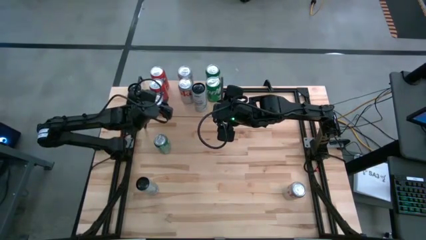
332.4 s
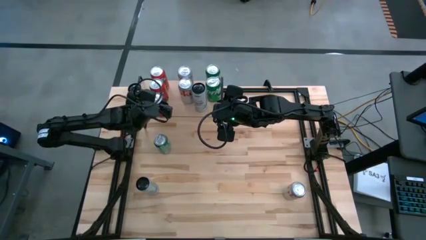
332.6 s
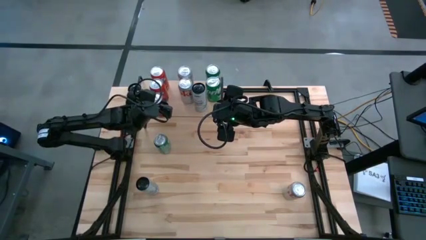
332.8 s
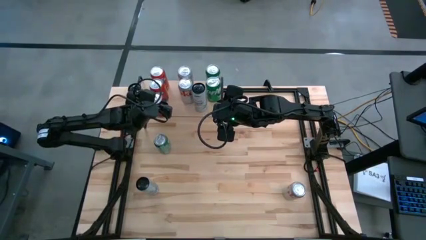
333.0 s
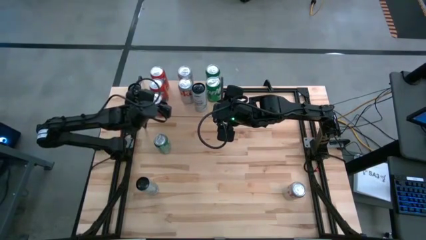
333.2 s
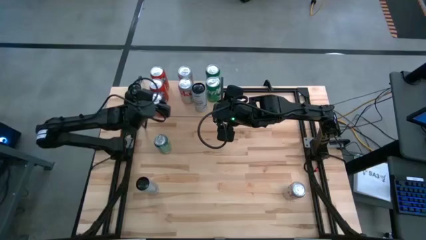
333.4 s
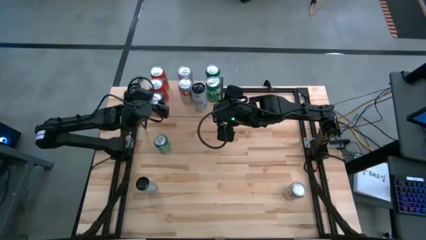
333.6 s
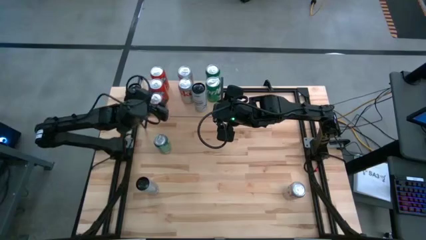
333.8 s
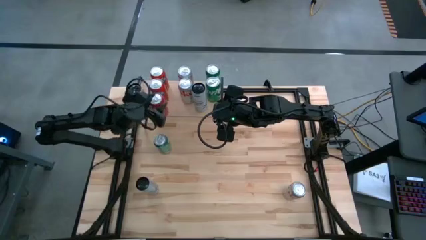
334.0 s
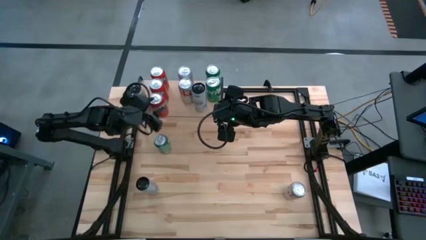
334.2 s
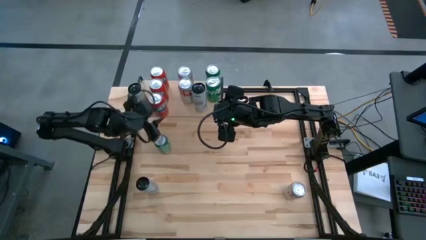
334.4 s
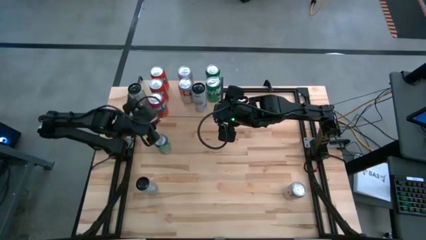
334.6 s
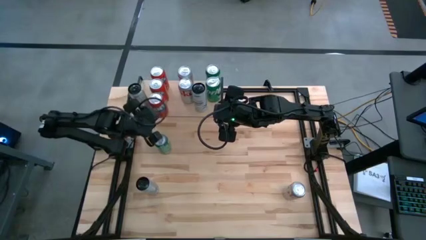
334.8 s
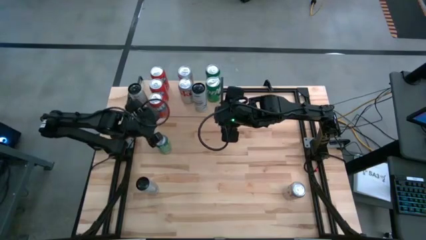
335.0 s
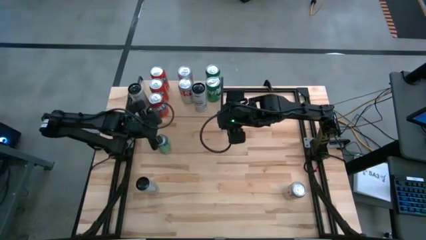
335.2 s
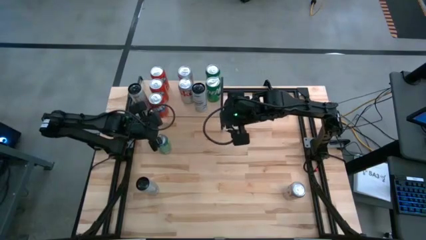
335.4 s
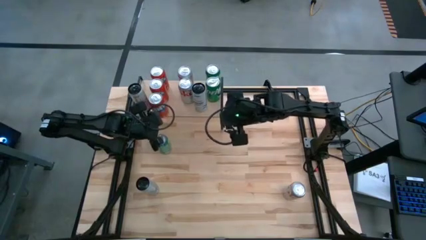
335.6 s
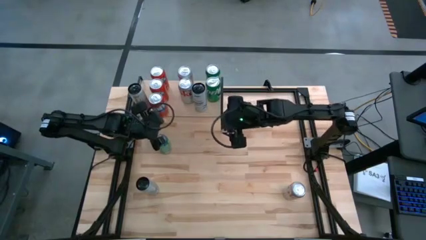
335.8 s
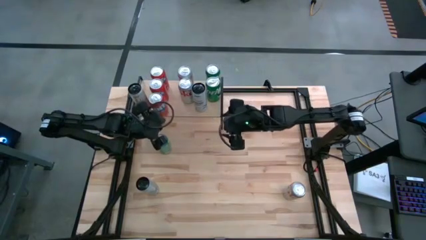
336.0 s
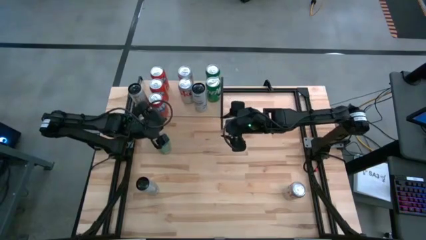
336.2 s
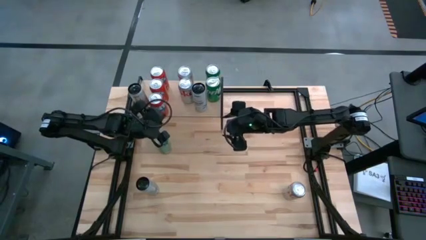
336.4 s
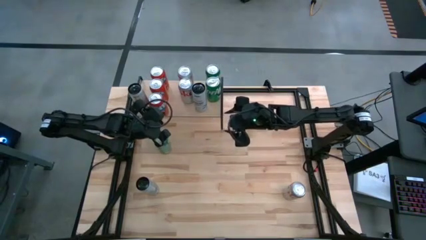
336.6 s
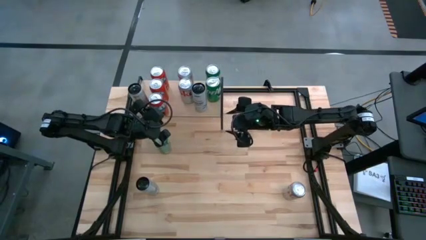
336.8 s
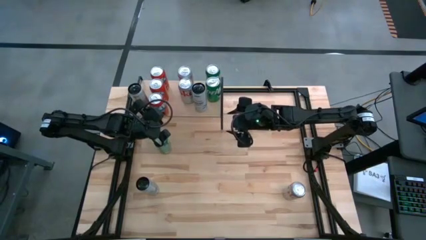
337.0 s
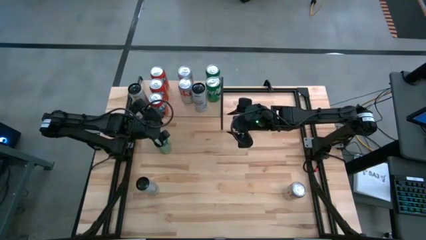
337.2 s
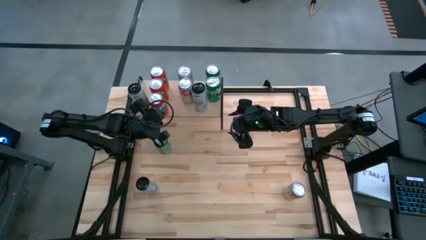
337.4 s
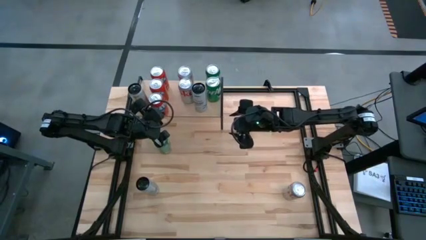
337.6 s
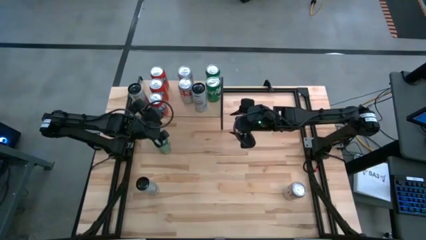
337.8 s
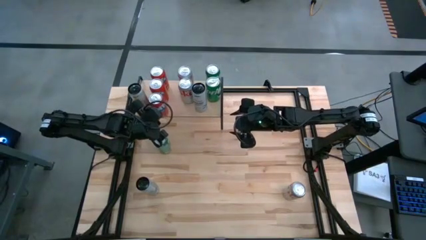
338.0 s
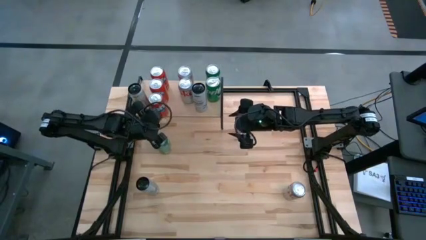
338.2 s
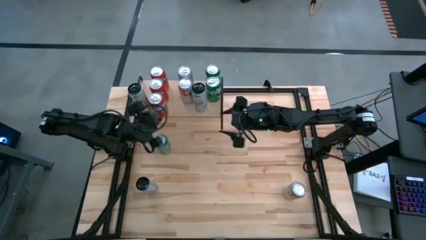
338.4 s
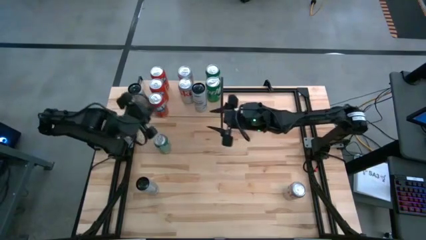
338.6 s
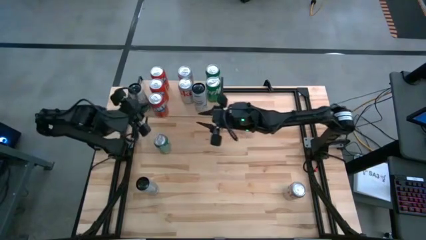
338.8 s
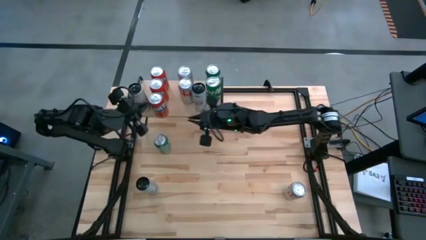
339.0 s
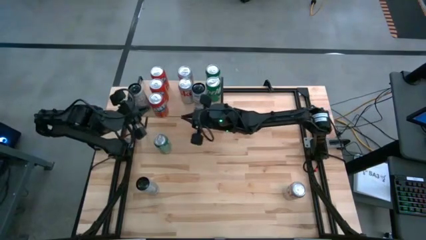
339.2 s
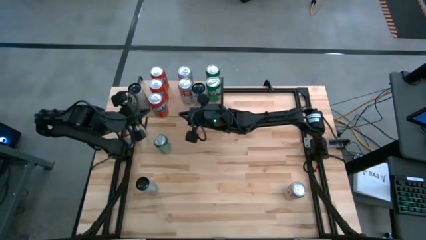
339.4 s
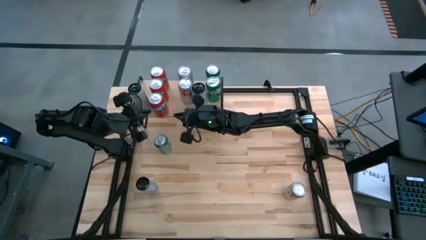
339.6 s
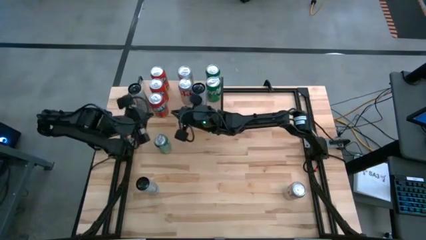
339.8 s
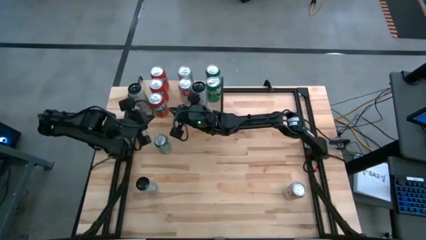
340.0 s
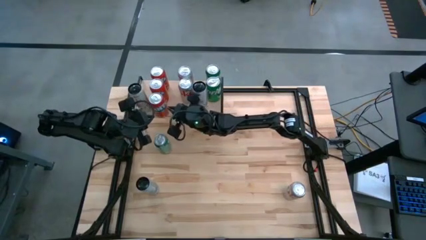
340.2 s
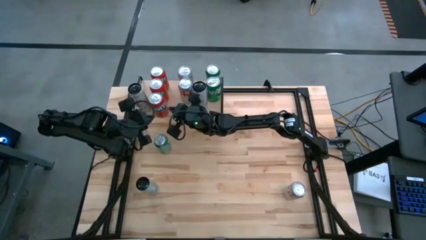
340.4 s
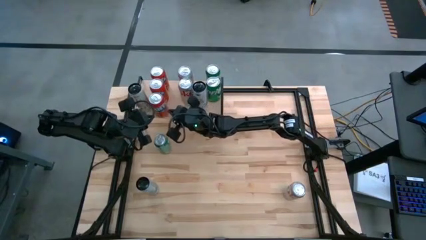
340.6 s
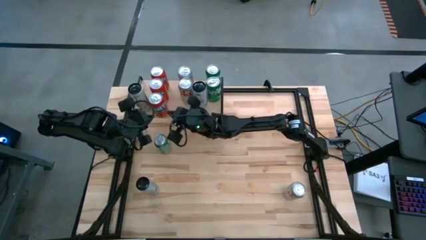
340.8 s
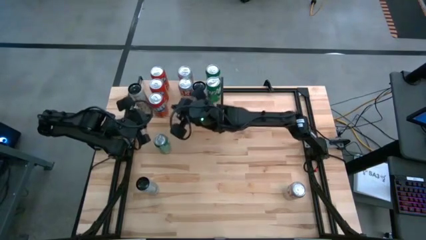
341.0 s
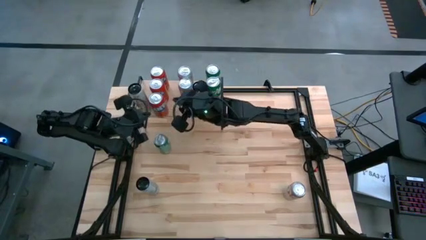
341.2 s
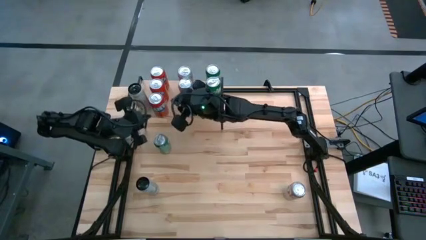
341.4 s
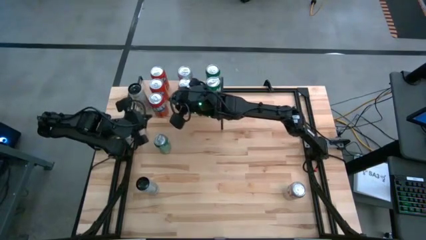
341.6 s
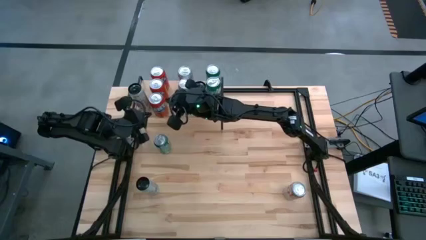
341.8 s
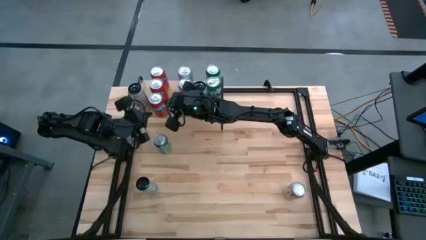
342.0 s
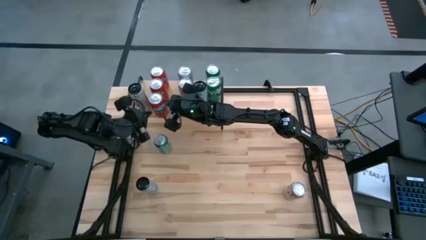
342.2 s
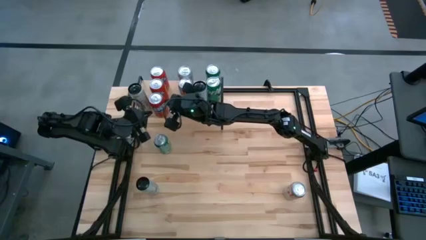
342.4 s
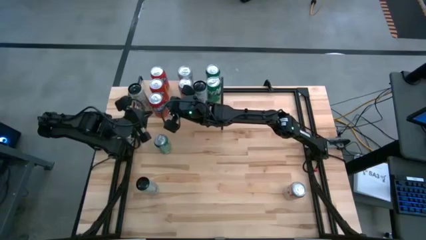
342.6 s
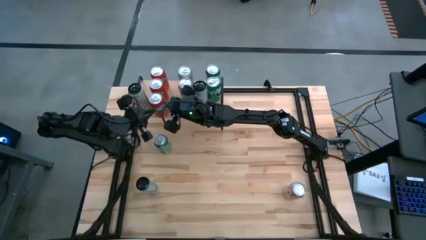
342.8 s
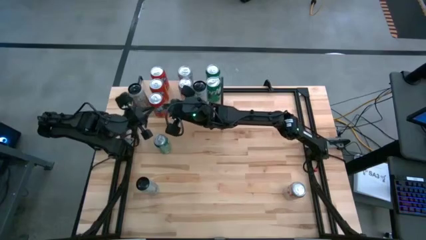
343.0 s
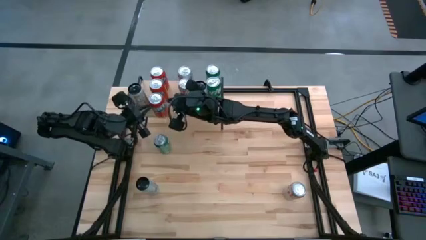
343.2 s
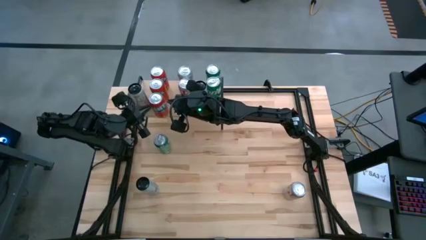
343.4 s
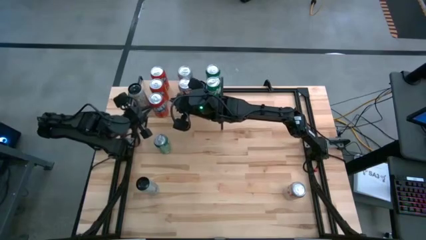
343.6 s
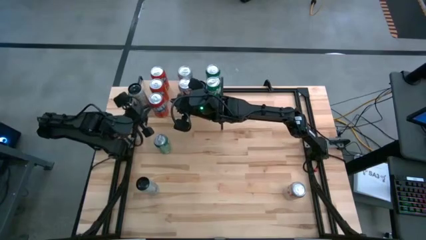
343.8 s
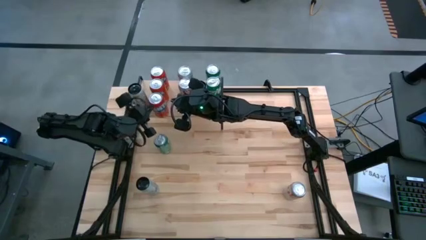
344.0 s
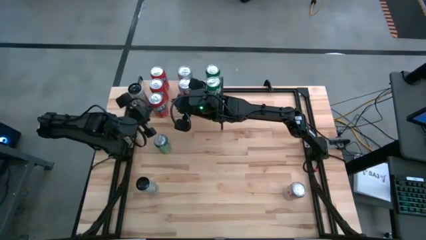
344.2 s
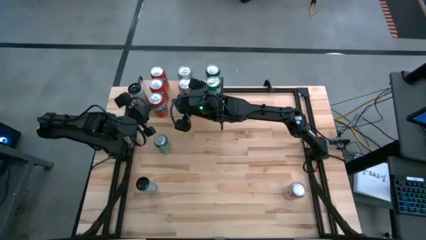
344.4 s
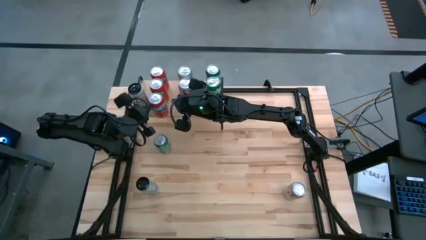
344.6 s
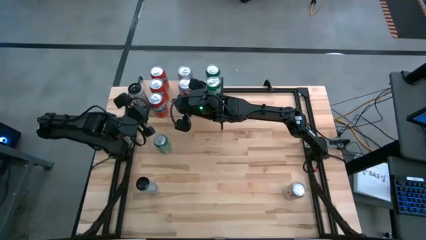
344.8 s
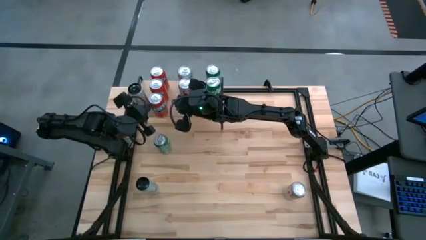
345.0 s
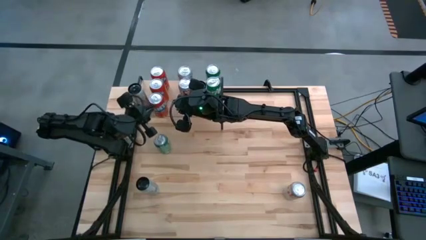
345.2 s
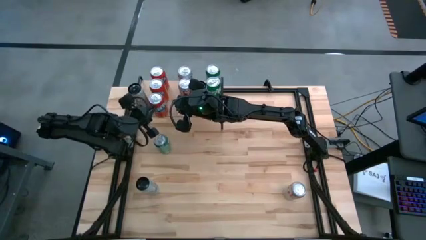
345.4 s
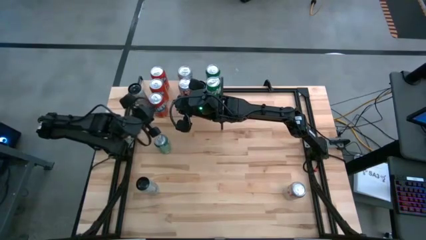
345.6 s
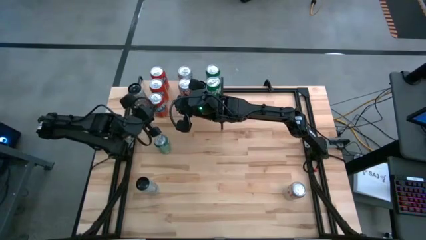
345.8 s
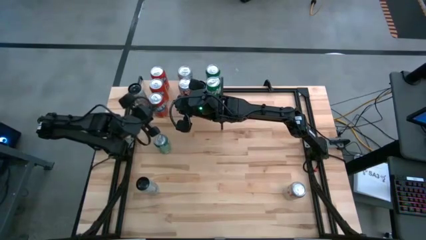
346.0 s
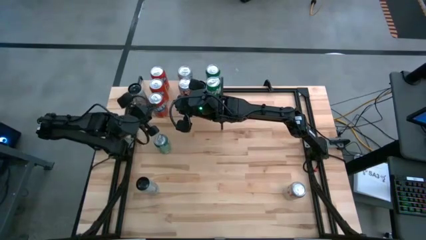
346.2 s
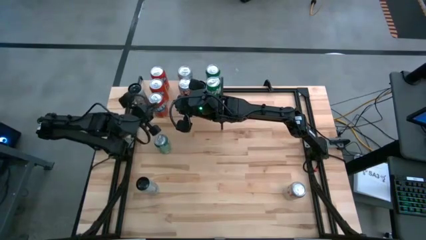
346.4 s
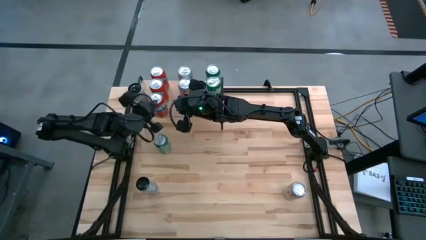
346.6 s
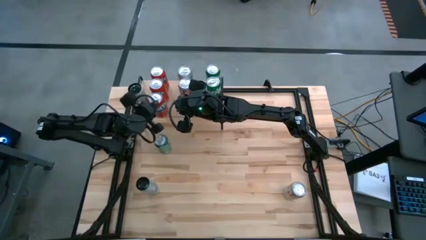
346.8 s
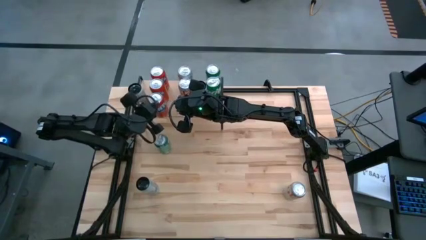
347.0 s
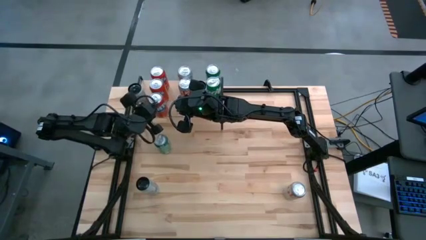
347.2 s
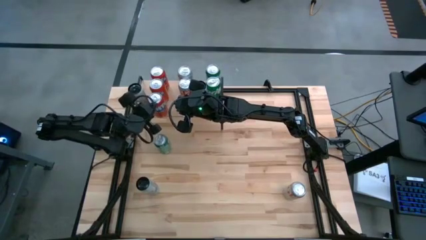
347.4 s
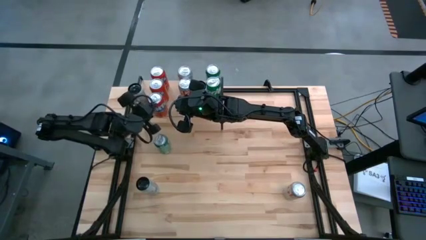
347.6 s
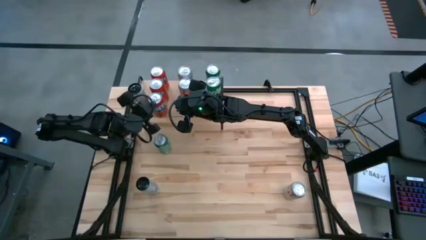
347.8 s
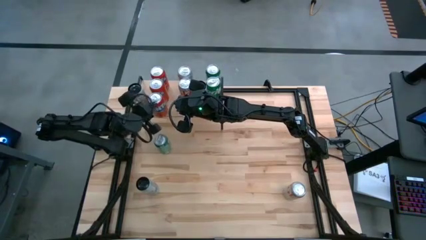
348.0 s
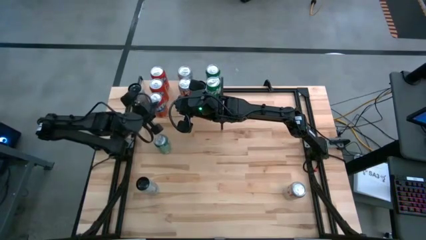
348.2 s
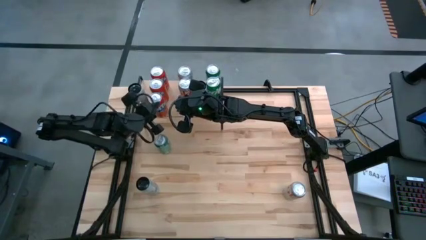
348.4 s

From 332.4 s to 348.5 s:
Task: Place canned beverage on shelf
Put the red soda can aligned with the other red soda cans on the shelf

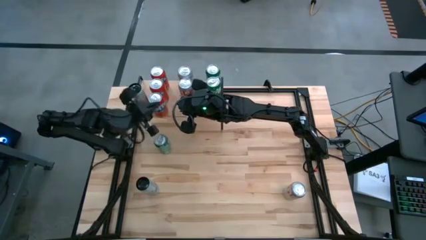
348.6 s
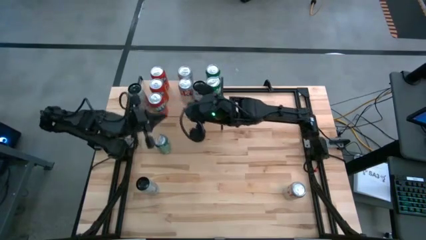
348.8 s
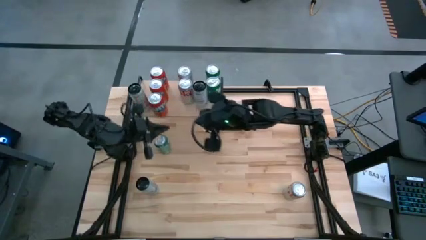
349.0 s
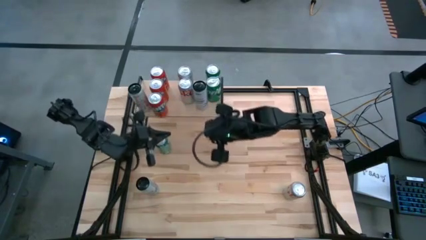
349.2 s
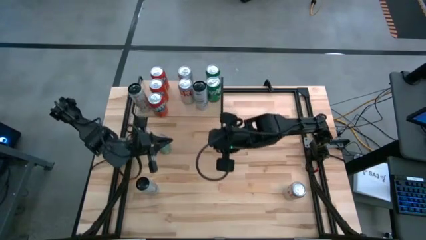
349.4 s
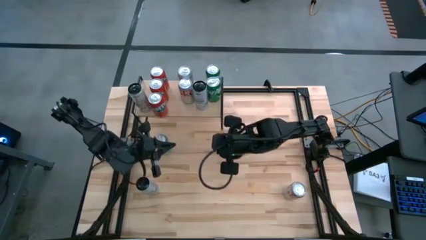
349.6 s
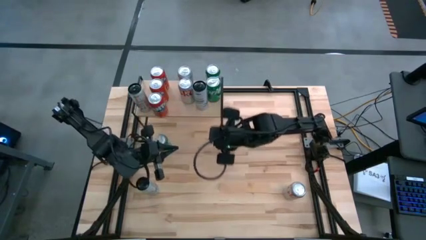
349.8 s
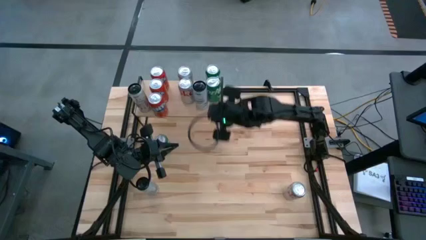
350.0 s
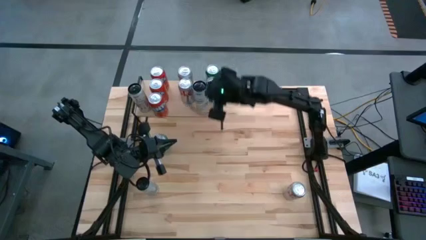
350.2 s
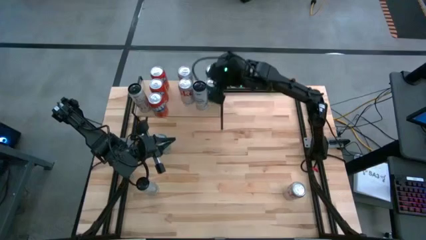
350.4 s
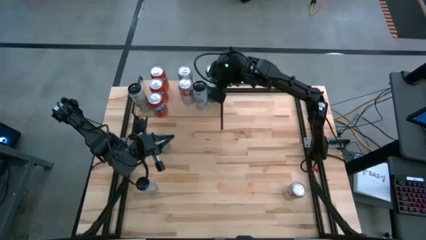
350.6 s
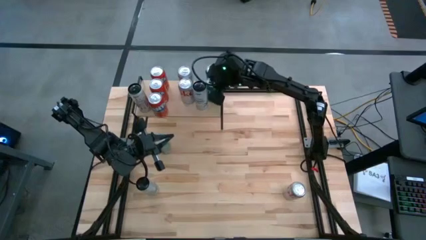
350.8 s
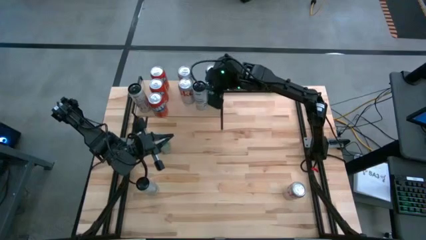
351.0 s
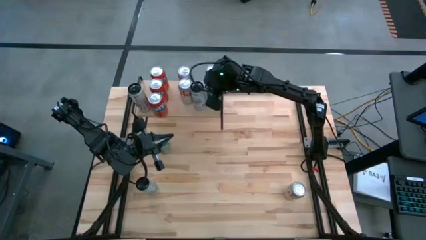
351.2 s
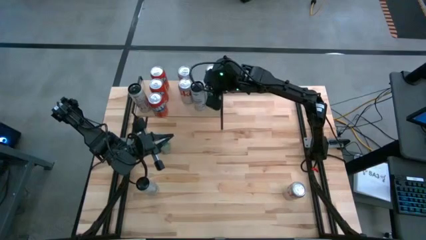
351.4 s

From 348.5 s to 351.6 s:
Adjust the white and blue soda can on the shelf
